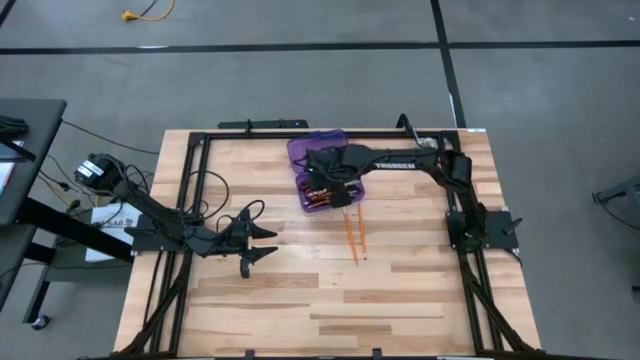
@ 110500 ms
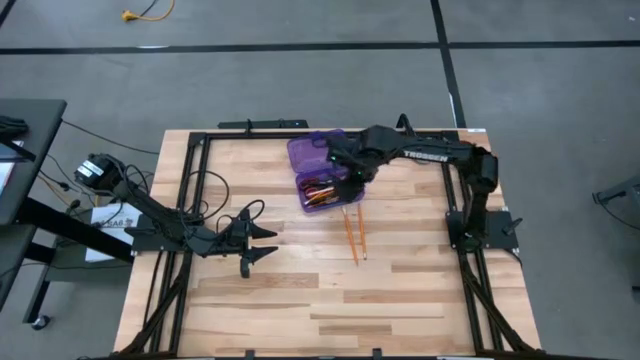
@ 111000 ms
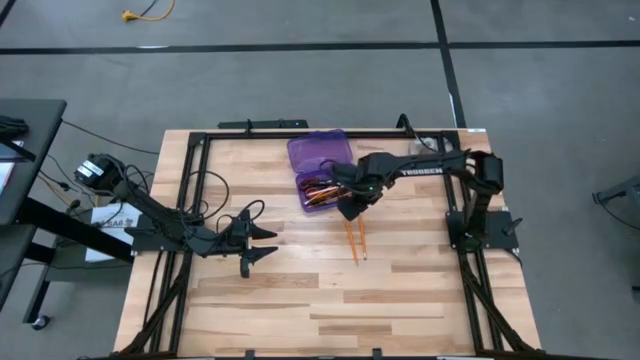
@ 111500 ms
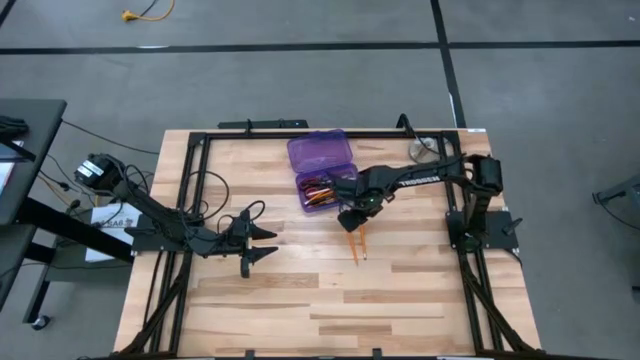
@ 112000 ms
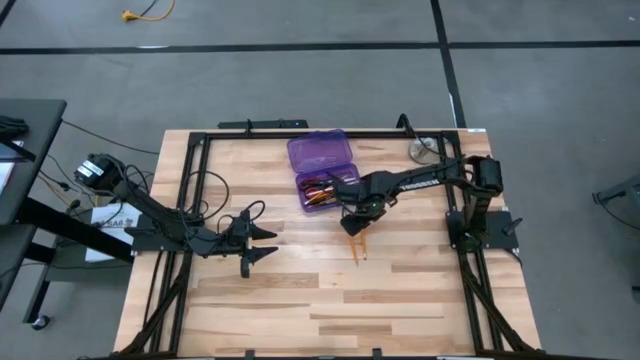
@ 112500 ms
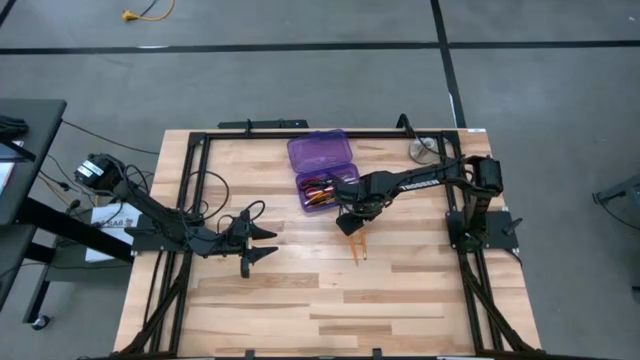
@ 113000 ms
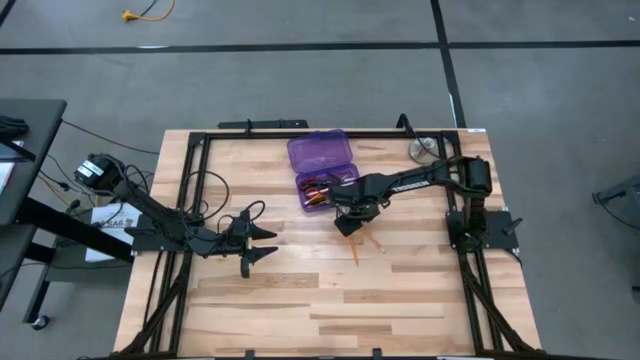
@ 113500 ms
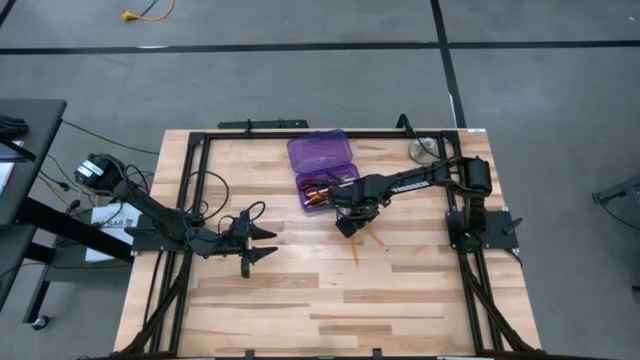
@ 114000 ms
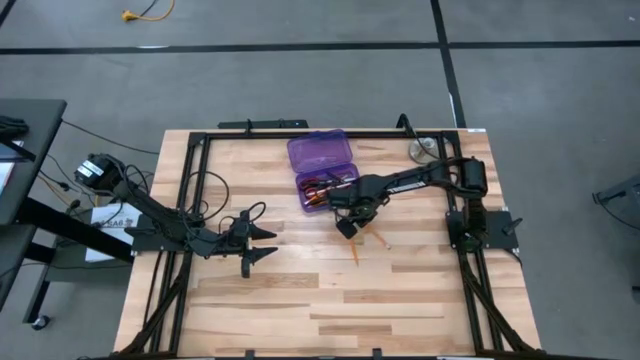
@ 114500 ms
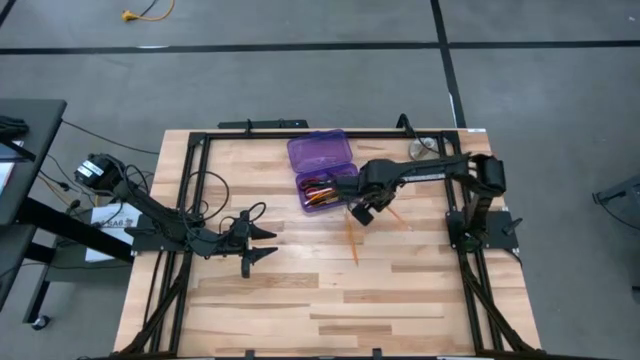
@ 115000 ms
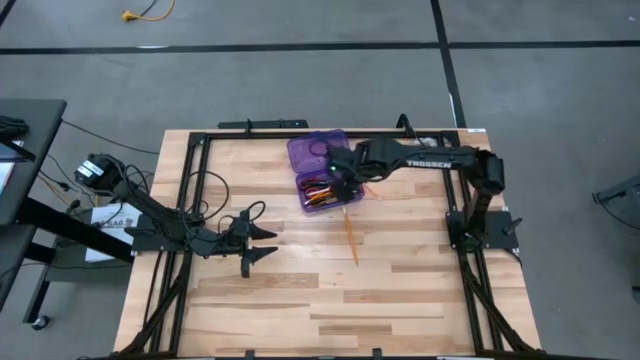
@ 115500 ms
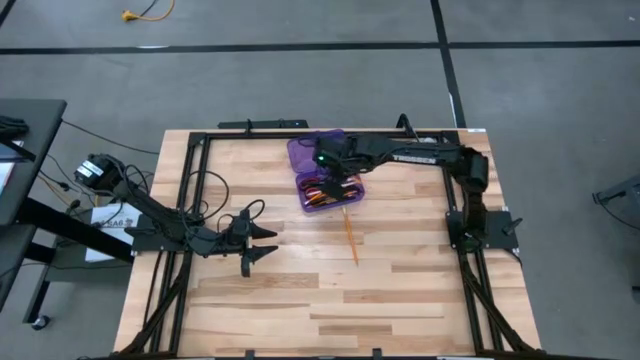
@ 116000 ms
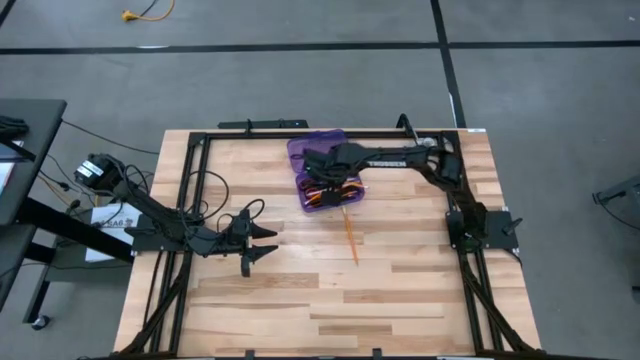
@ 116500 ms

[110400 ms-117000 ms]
Task: Pick & place school supplies into a supply box
Put the yellow pencil into the purple supply box

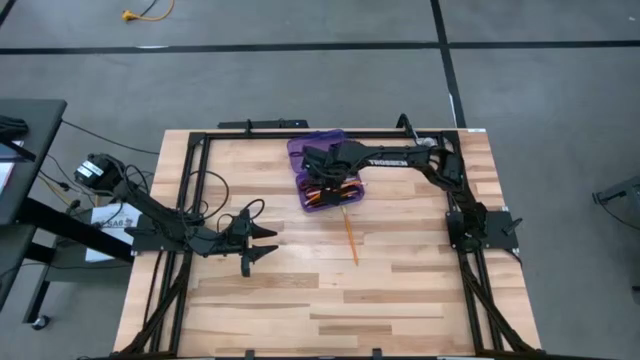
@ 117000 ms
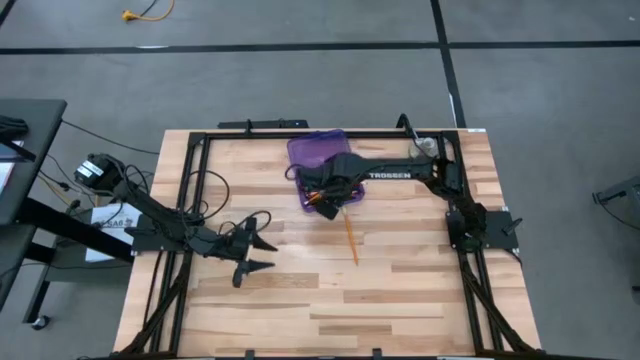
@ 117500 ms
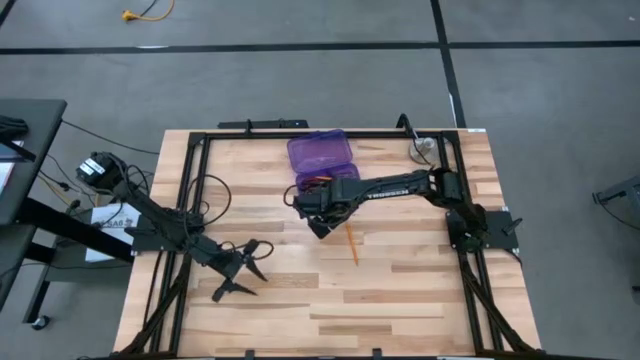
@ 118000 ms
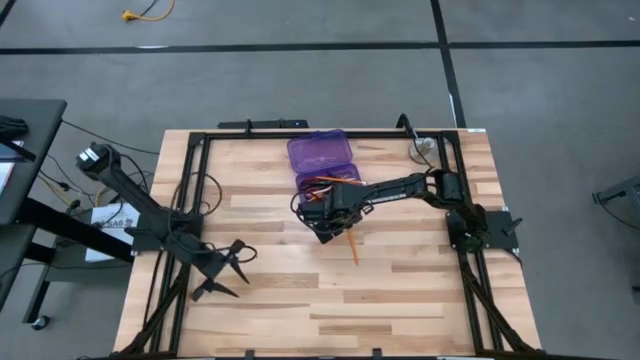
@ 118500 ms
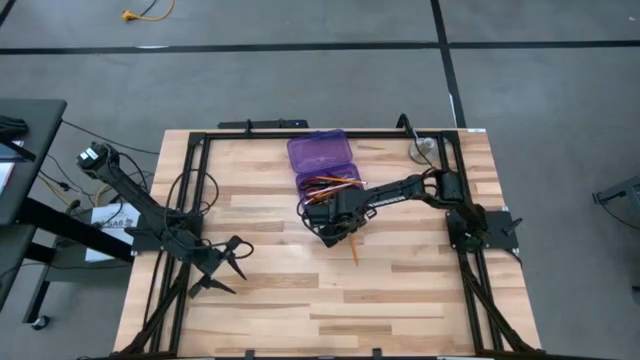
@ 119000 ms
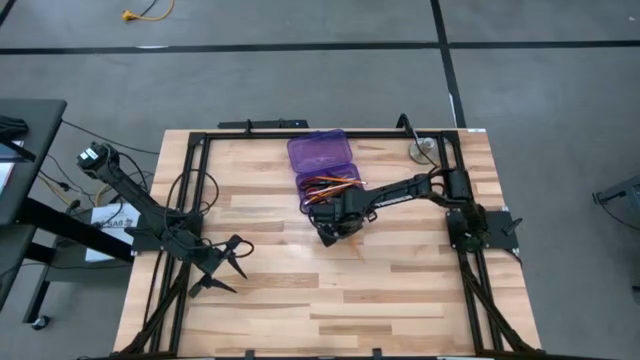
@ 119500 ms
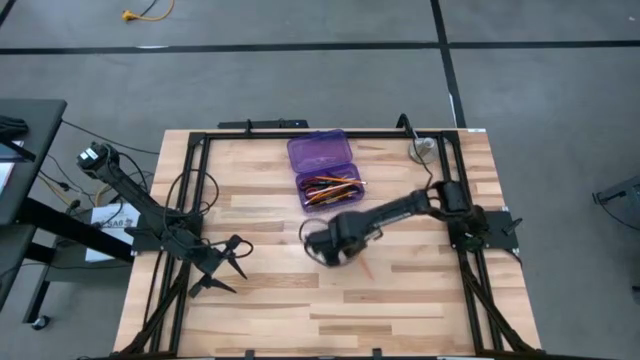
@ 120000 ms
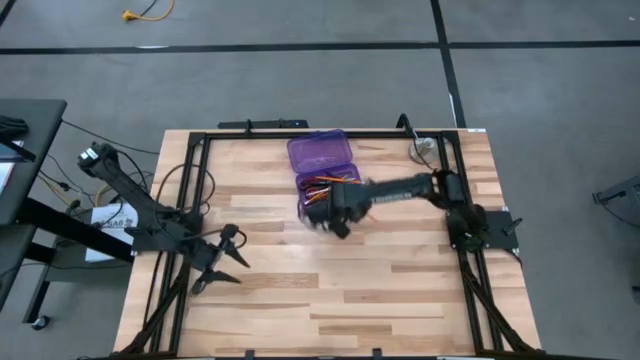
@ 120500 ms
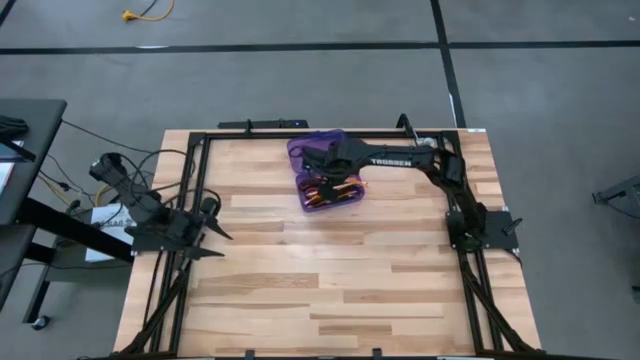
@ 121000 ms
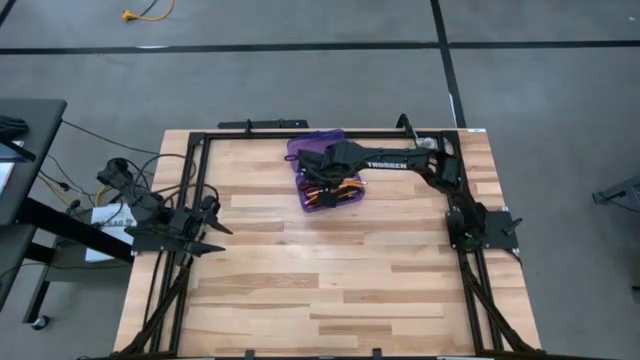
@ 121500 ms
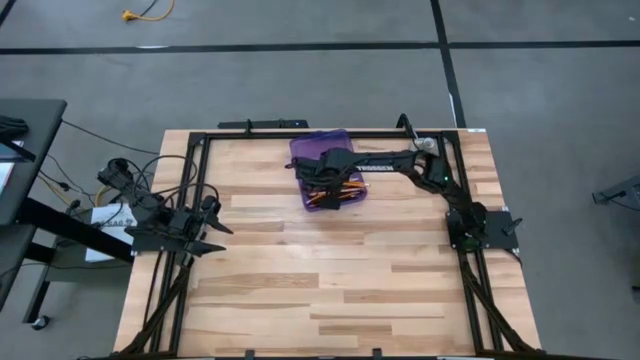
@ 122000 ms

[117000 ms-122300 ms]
Put the yellow pencil into the purple supply box

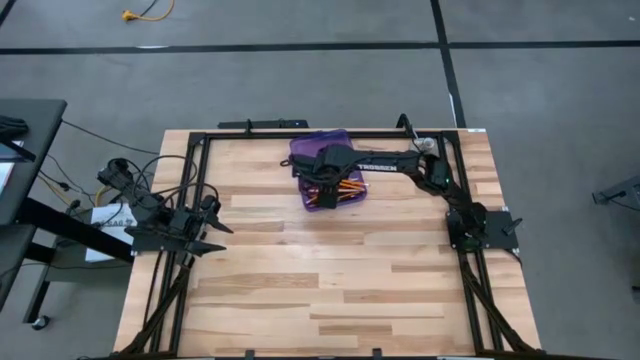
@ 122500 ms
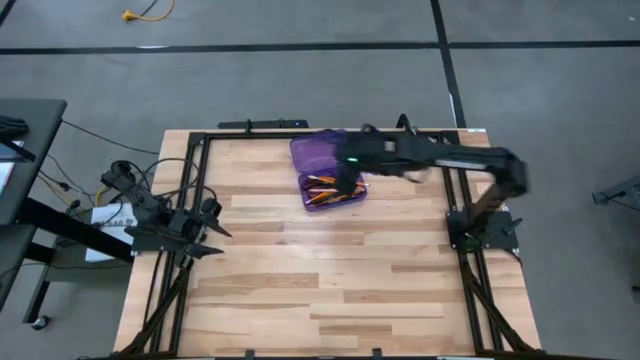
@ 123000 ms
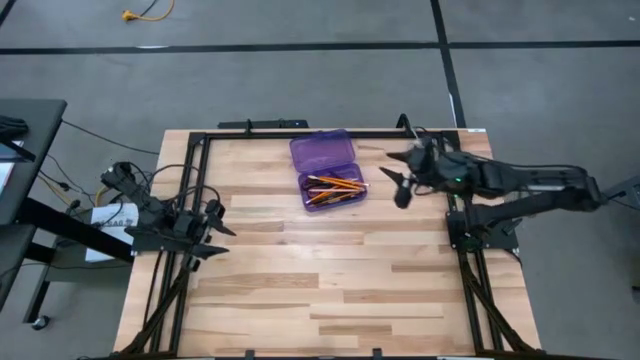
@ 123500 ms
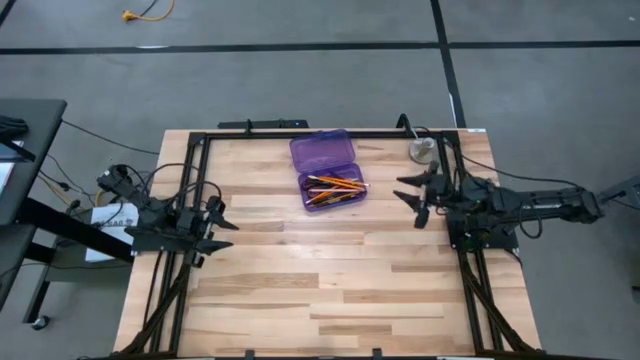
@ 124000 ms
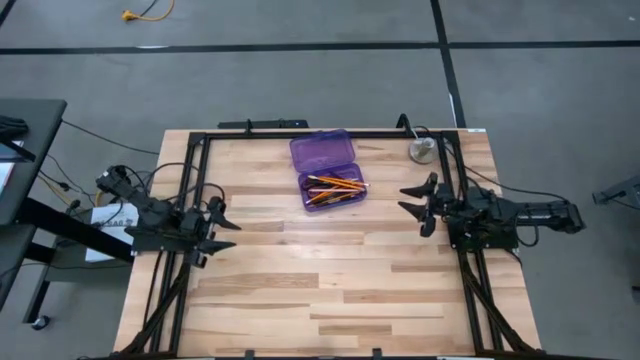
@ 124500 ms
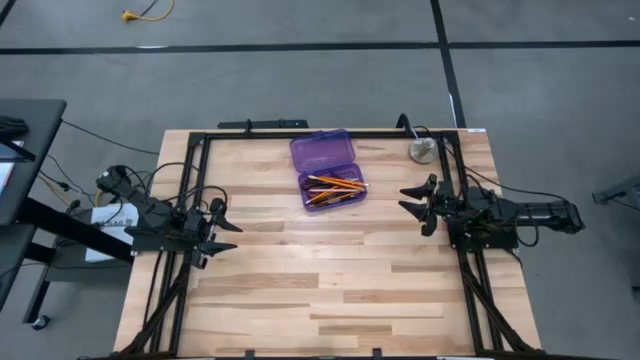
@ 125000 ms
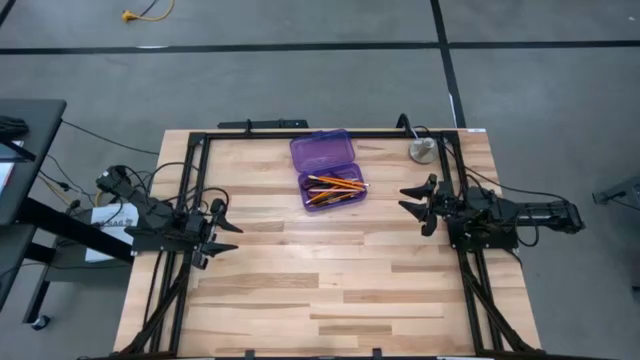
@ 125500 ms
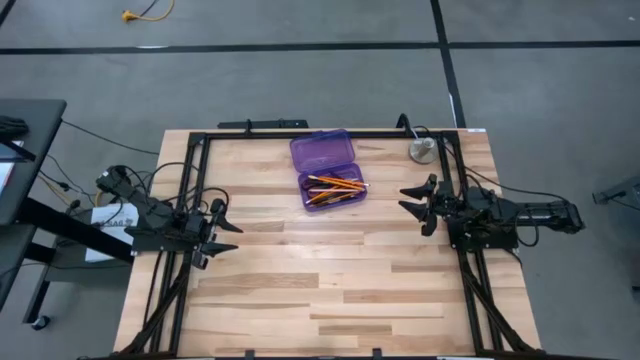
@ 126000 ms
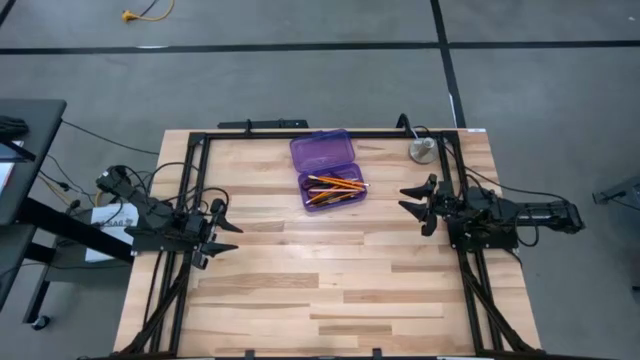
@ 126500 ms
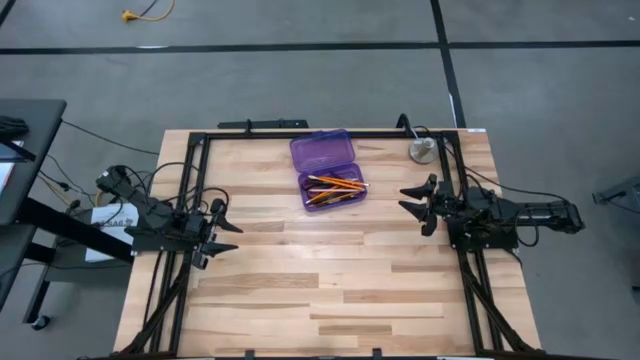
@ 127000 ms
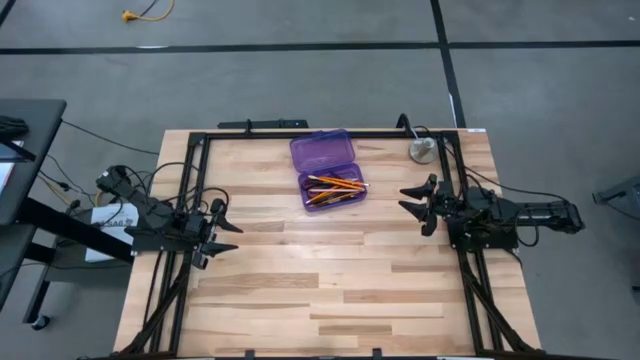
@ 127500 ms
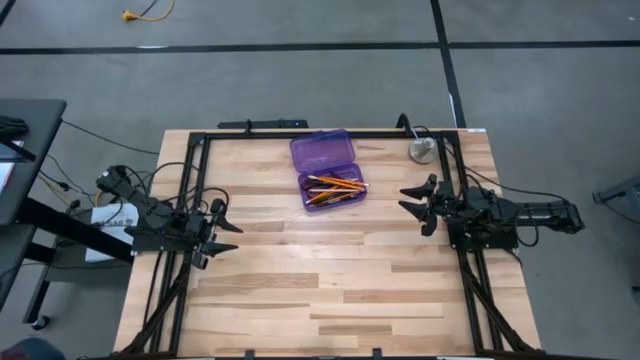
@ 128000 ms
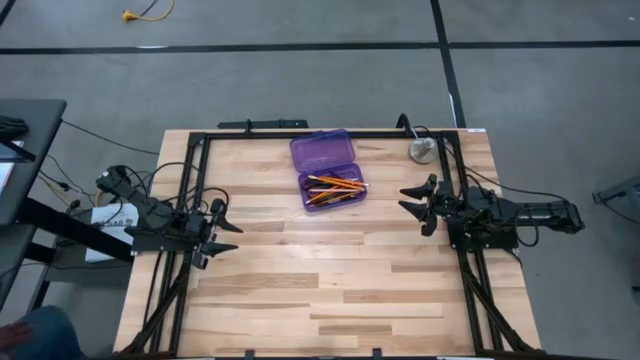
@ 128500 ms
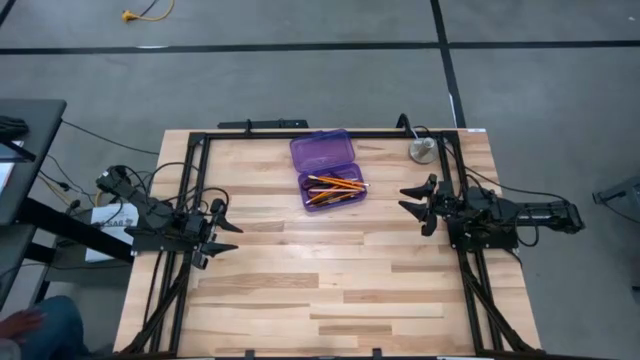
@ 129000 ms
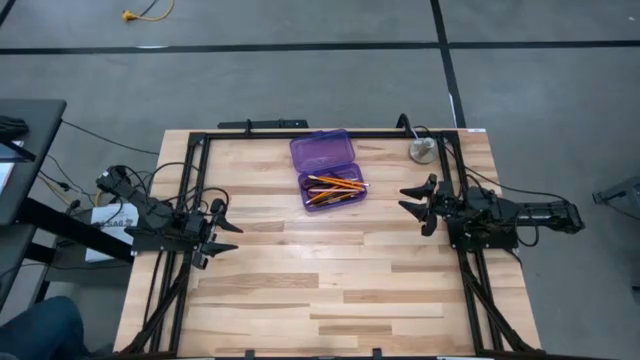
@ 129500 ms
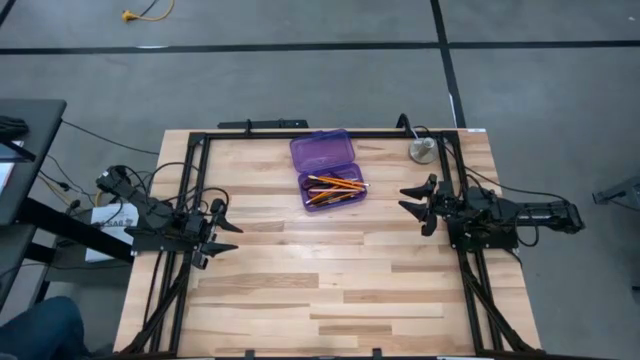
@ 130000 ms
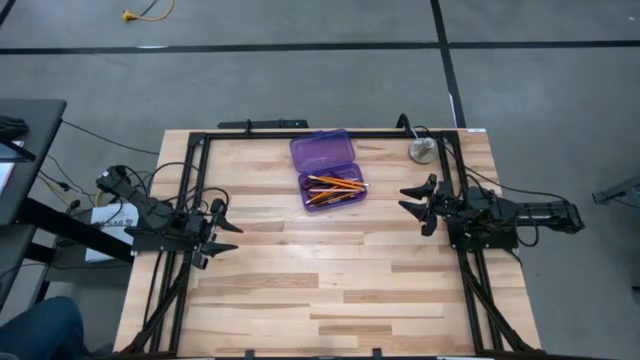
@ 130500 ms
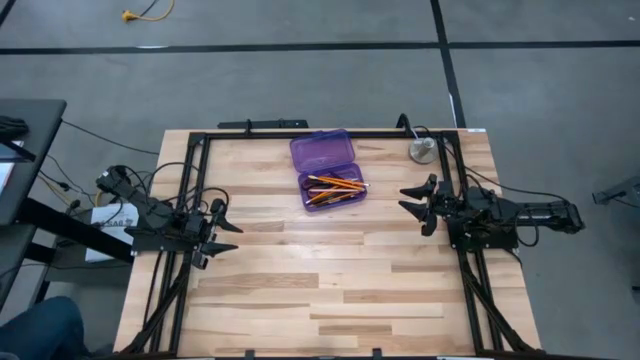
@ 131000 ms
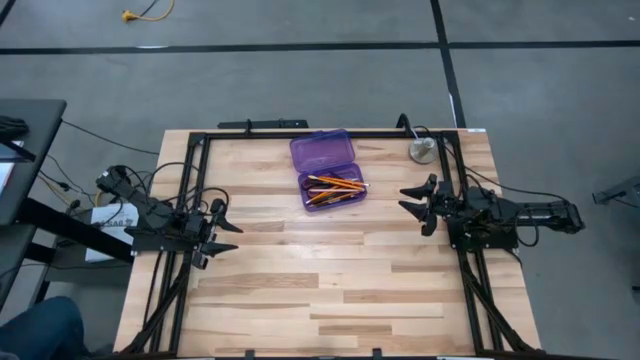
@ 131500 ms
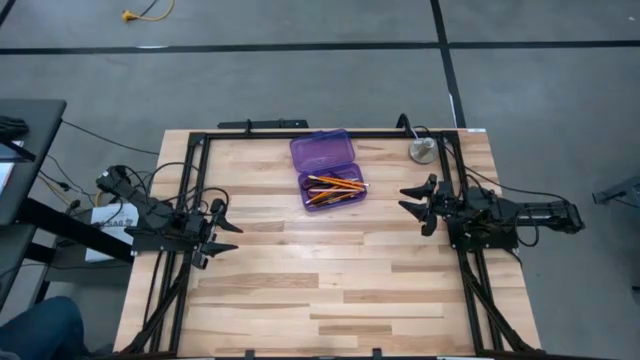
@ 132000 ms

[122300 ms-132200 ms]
Return to Home Position
